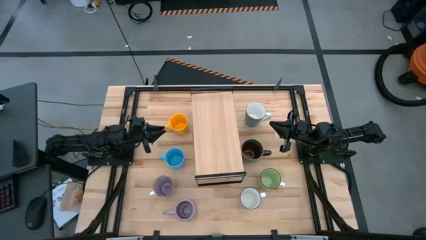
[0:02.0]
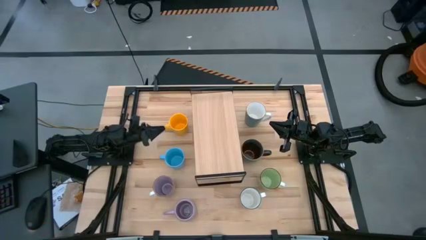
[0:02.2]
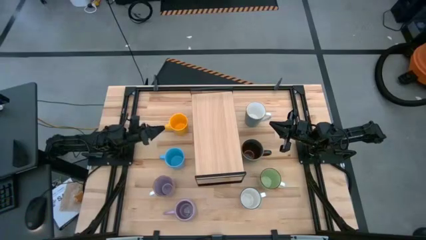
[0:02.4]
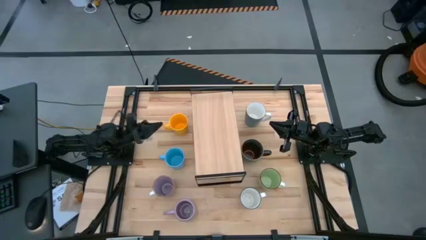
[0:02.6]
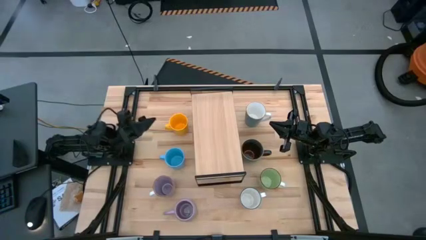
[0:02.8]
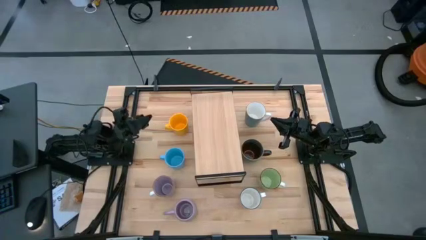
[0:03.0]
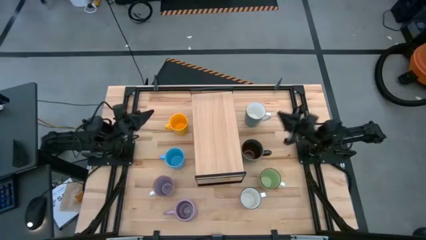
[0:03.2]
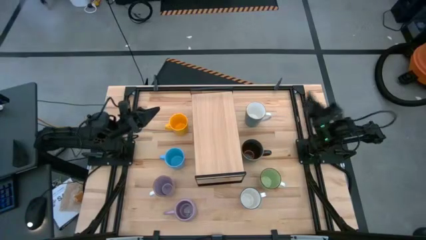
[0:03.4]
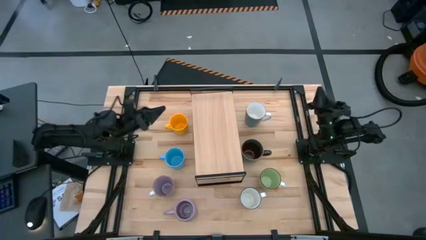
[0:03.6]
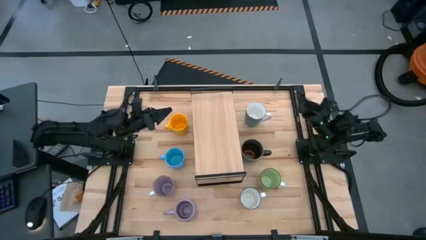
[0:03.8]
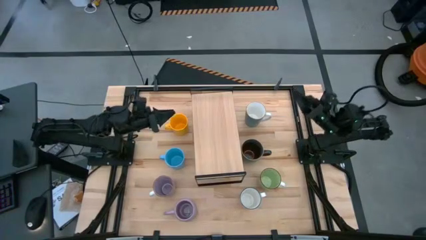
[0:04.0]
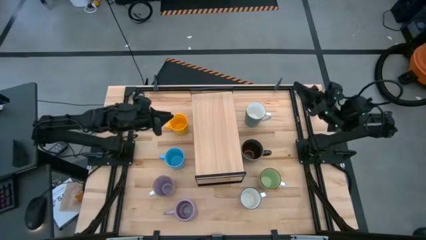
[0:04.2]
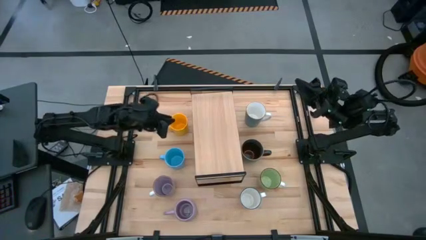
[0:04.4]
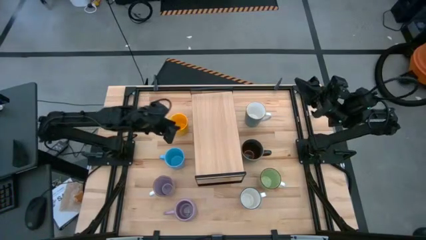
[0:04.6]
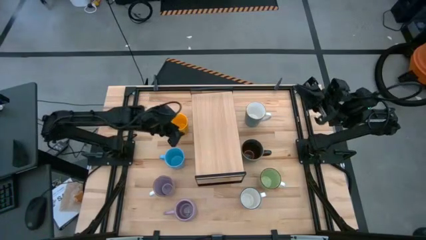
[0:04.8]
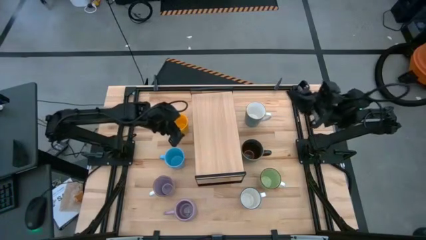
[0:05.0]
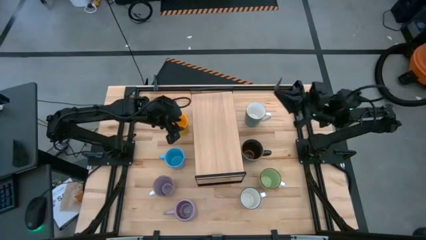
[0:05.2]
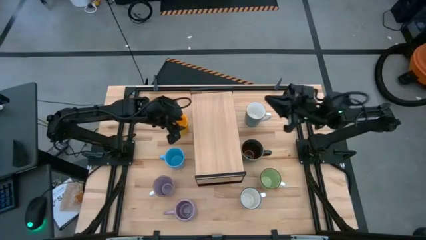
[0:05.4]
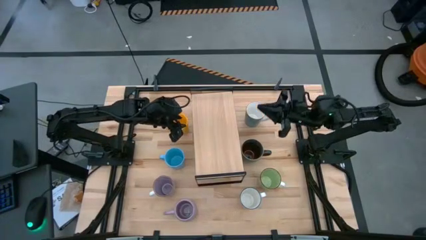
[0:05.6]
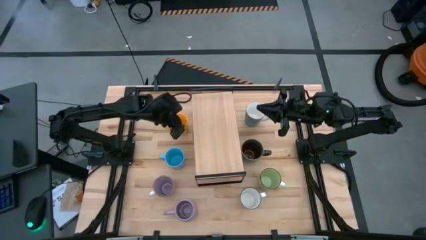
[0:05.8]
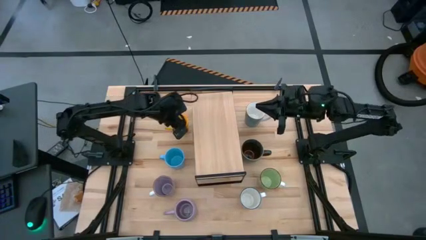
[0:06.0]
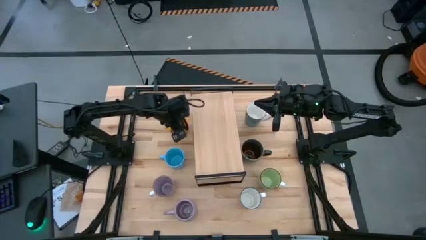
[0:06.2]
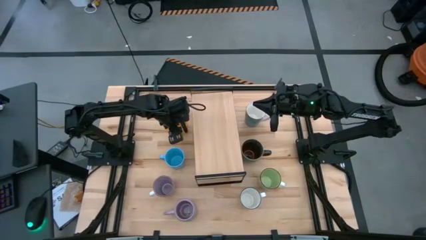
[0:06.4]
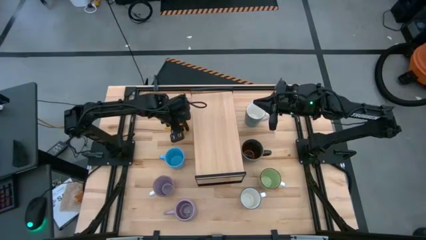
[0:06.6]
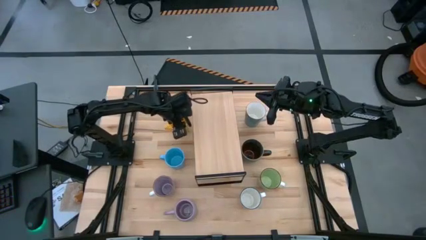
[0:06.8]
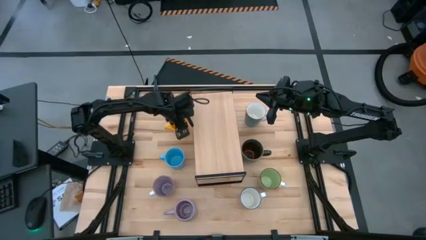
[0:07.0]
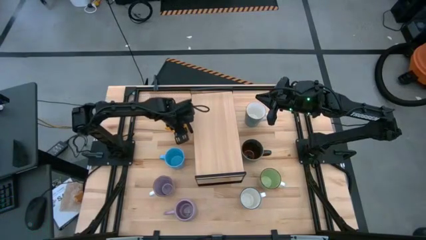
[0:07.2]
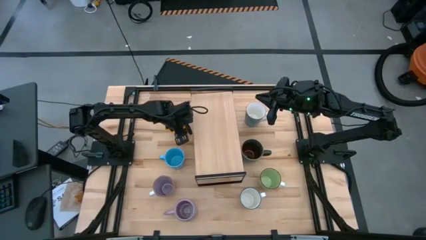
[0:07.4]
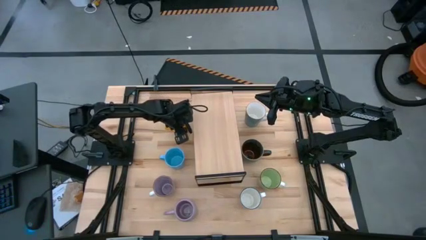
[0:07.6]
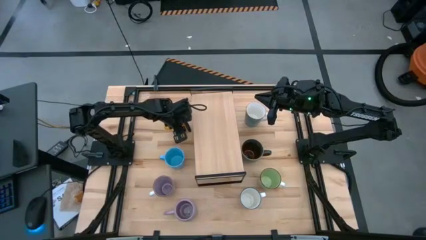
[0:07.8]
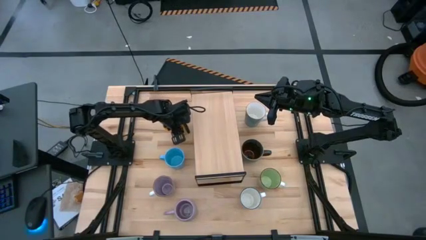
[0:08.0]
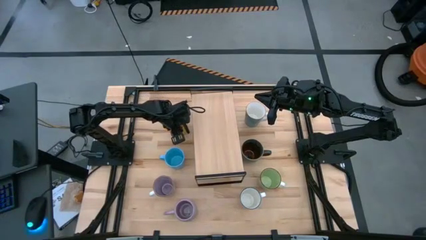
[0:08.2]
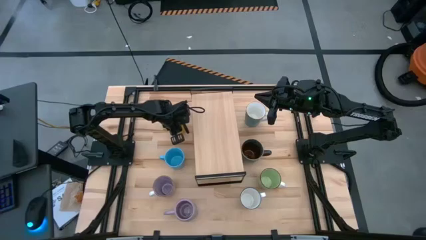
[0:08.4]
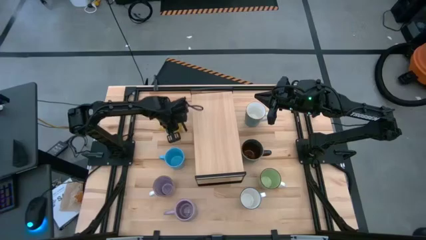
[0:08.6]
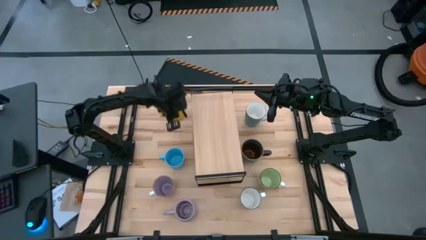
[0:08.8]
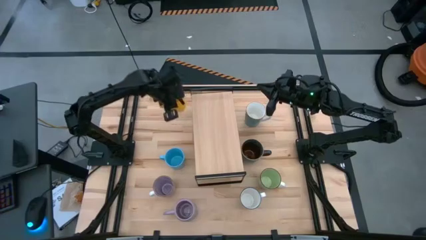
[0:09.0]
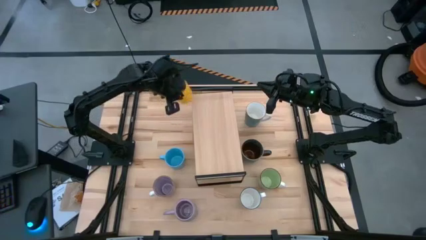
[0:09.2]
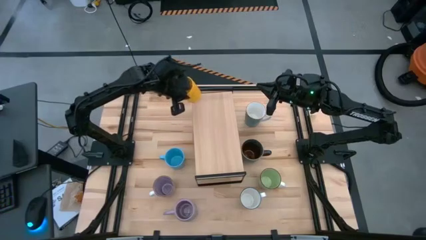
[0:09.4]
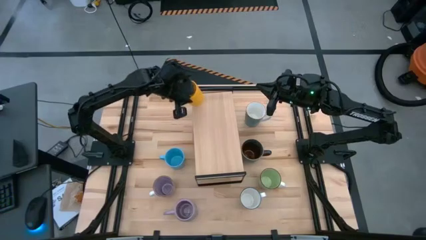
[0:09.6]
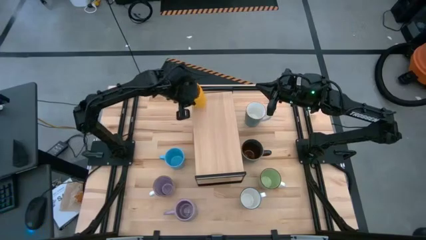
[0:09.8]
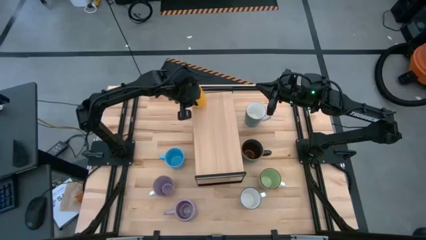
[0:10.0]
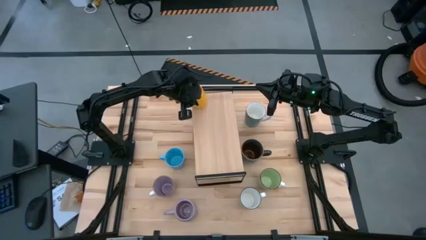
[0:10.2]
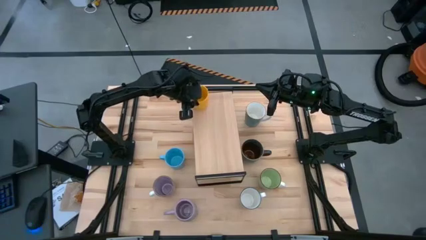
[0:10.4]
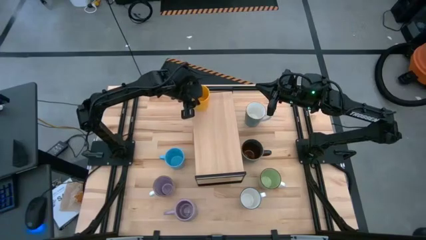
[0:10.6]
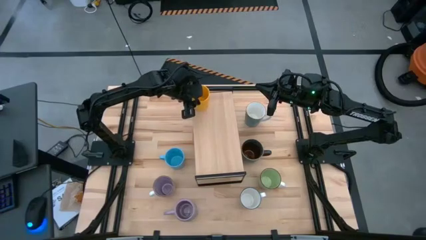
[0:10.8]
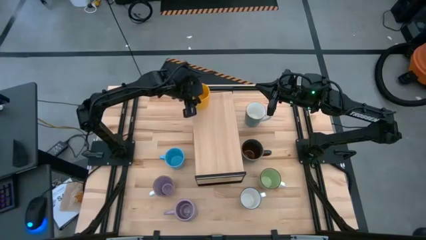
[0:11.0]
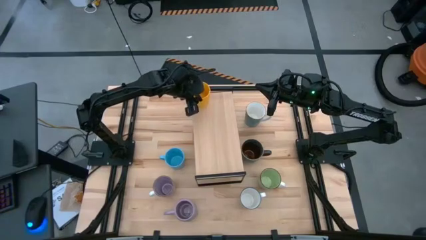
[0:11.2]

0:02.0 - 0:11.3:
Task: Place coffee mugs
Put the yellow mug on the shelf

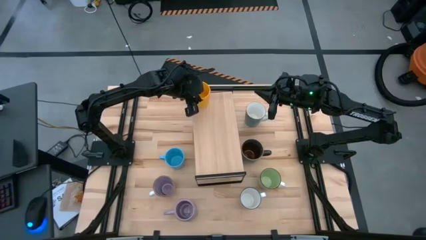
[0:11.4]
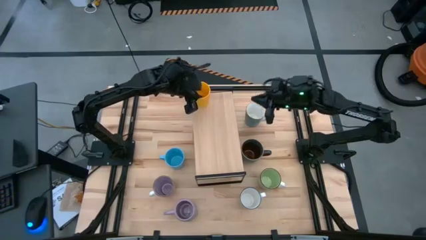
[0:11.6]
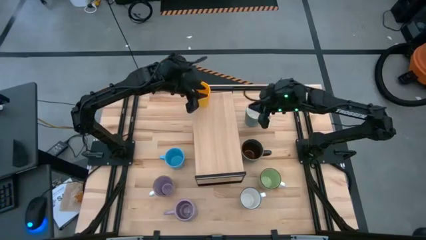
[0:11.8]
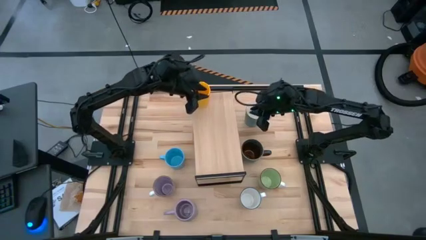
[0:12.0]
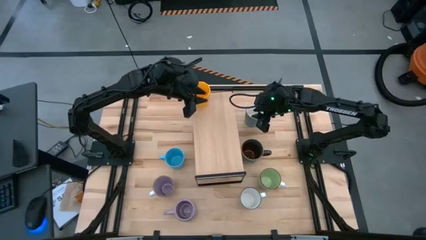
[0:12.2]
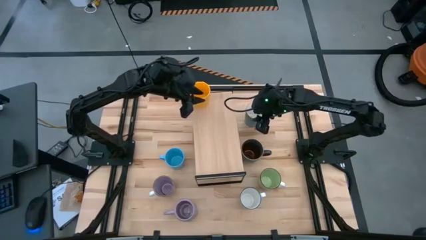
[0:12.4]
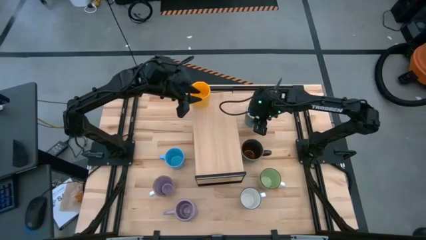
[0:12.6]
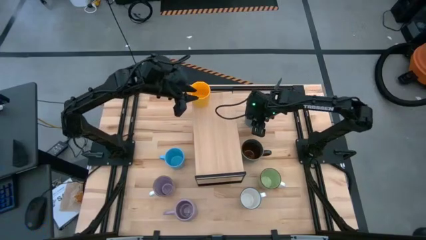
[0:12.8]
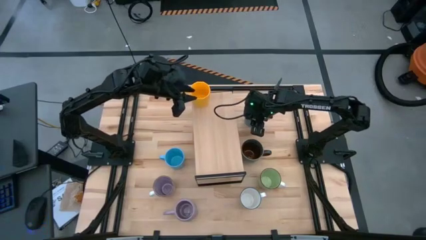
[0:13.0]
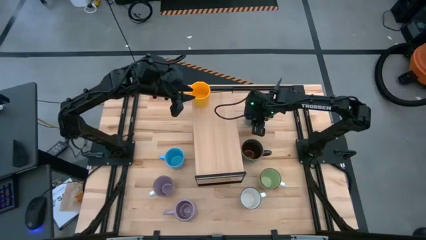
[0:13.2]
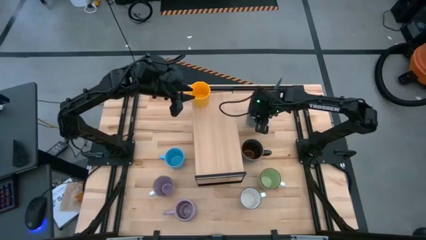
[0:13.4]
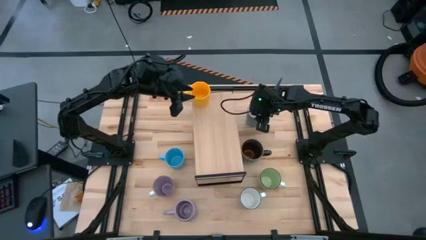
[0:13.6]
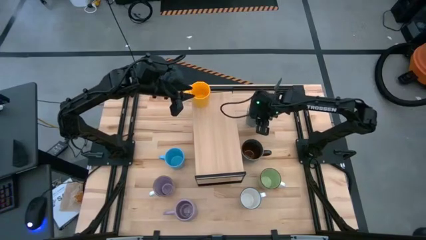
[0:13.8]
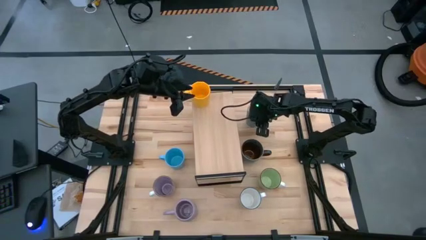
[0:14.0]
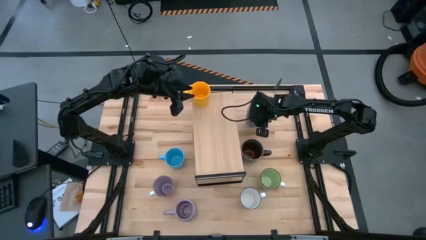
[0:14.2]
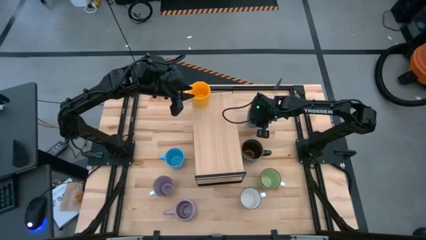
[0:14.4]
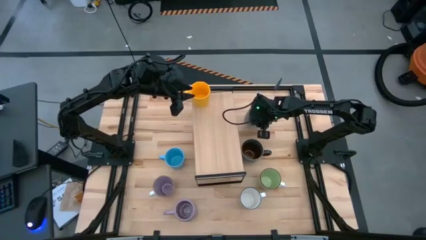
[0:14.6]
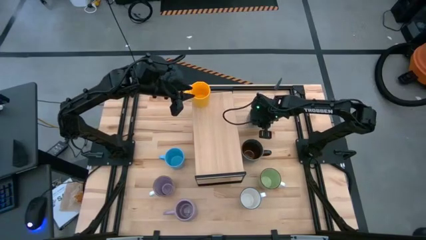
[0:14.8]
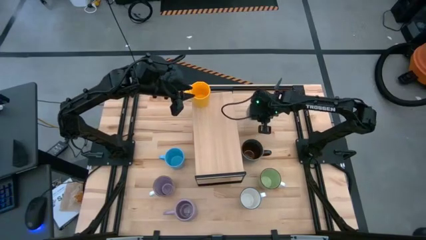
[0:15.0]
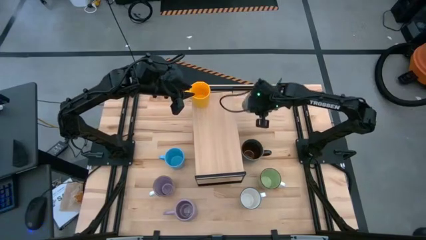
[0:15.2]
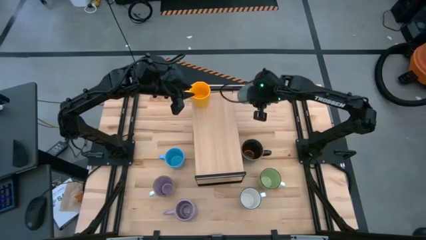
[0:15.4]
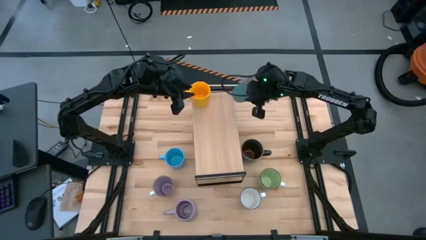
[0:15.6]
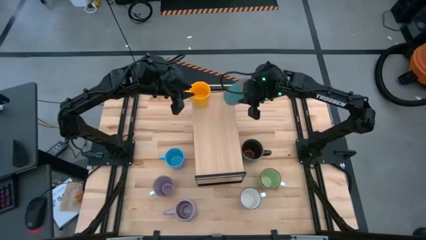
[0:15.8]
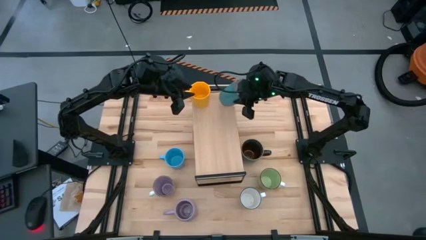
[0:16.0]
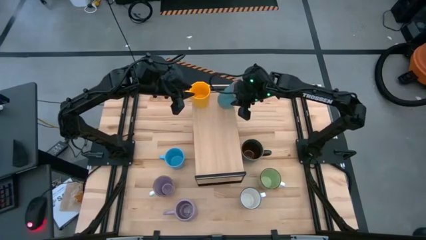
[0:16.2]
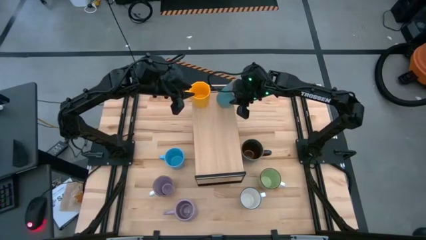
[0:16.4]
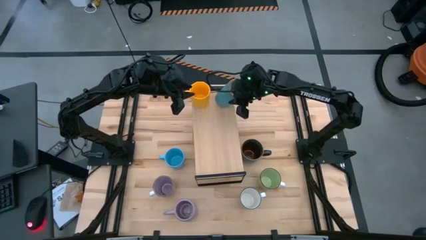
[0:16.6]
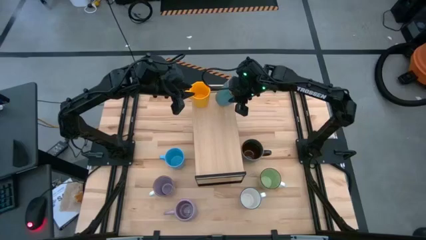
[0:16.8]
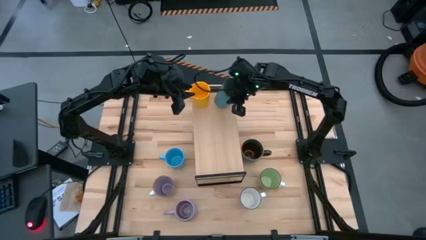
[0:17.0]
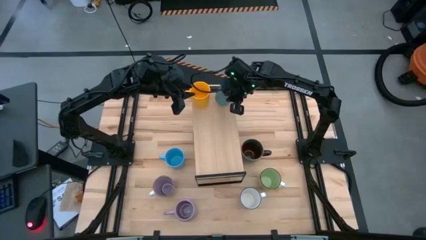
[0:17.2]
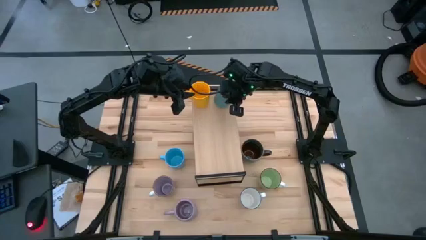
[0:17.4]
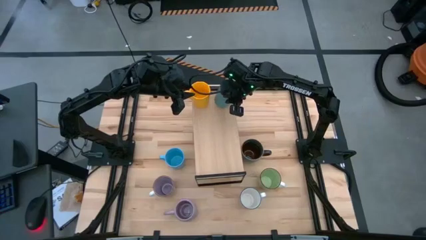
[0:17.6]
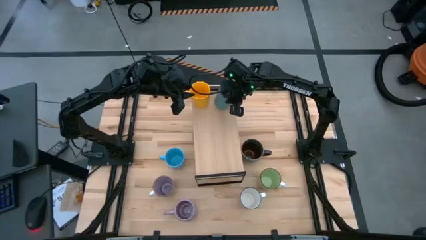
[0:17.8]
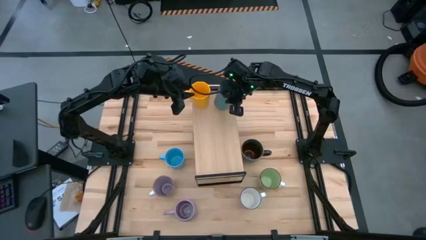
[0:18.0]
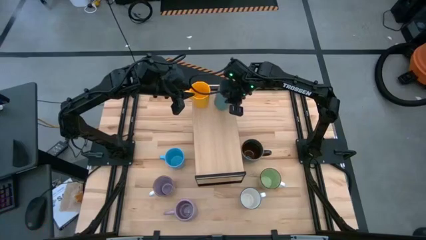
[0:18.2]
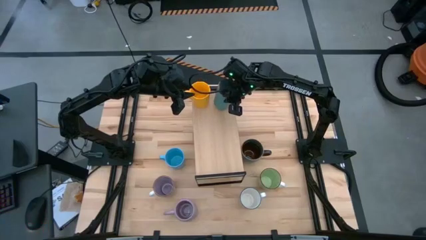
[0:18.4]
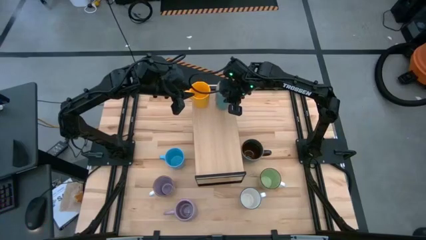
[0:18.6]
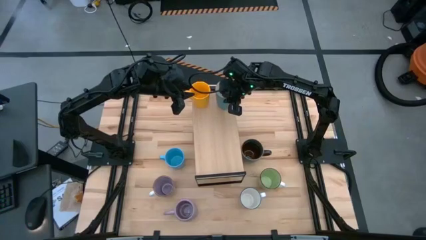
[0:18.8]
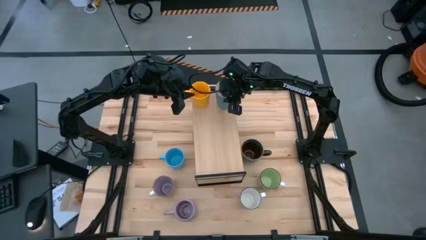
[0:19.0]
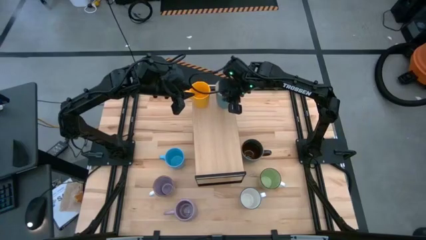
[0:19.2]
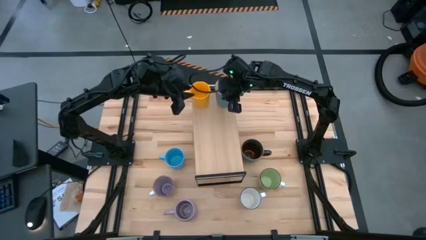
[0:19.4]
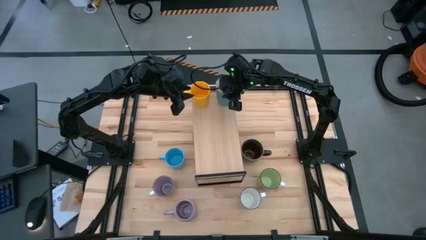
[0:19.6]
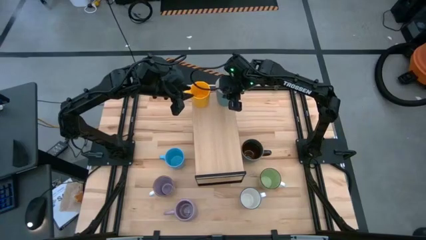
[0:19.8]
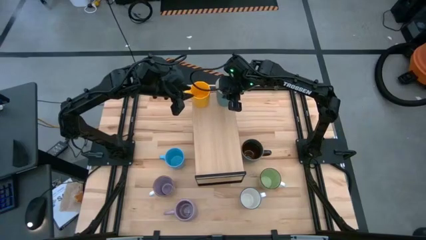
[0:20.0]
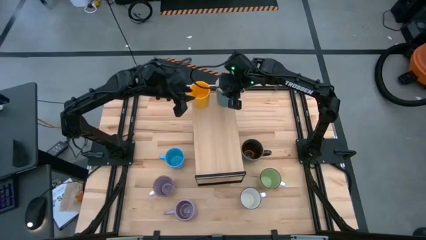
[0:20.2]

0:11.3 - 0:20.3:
Put the blue mug on the shelf
